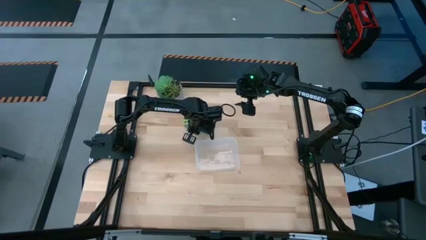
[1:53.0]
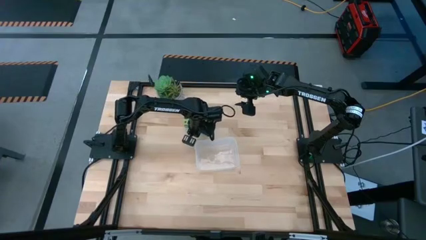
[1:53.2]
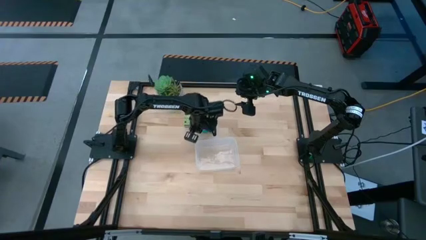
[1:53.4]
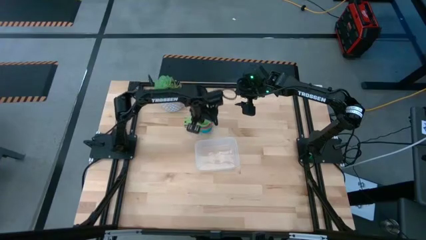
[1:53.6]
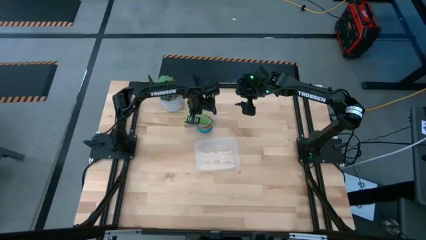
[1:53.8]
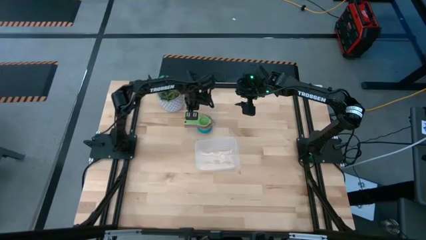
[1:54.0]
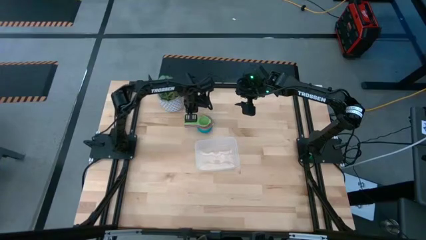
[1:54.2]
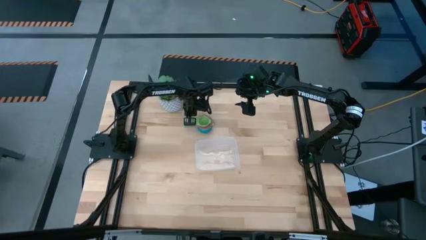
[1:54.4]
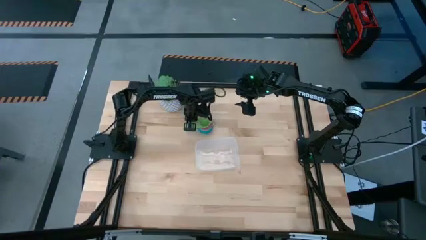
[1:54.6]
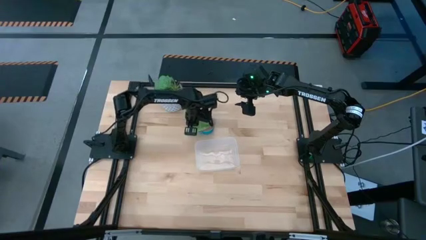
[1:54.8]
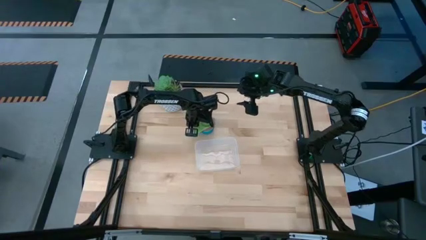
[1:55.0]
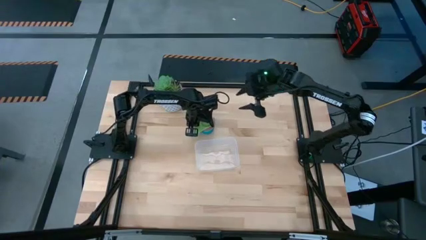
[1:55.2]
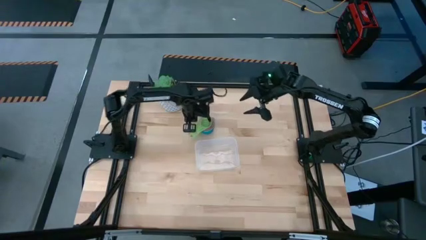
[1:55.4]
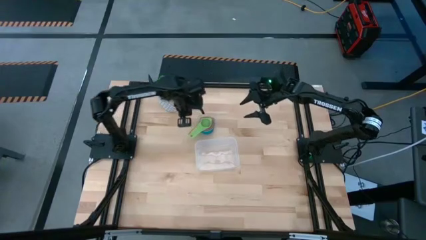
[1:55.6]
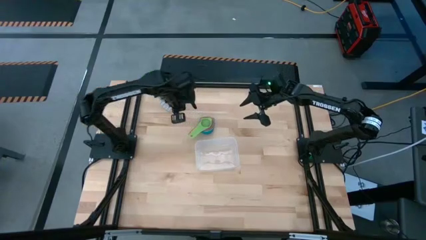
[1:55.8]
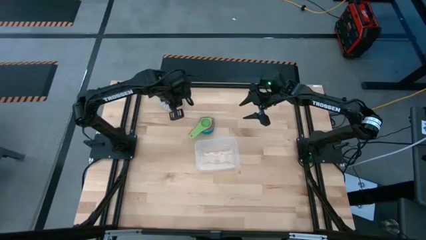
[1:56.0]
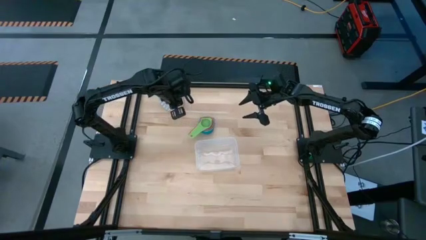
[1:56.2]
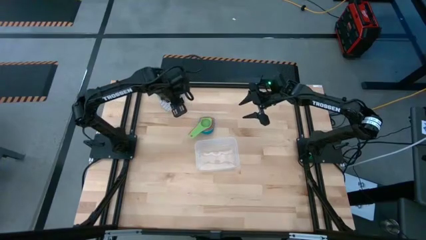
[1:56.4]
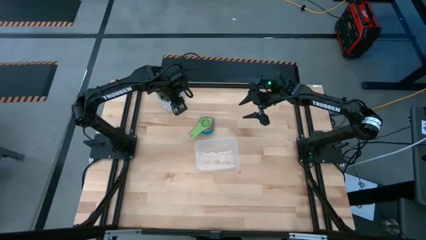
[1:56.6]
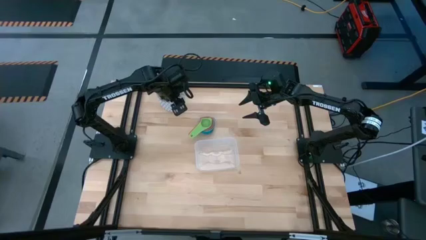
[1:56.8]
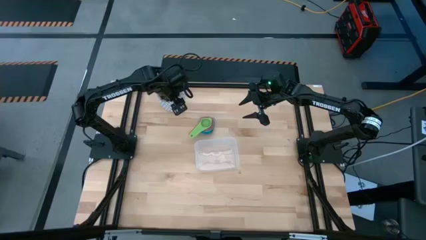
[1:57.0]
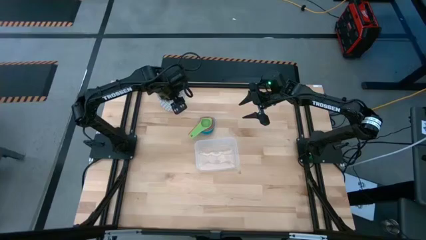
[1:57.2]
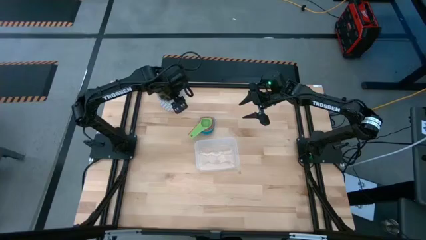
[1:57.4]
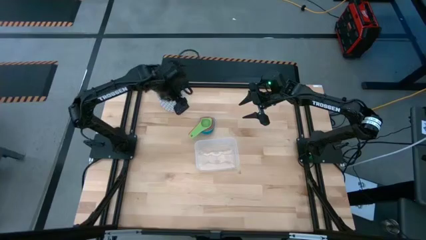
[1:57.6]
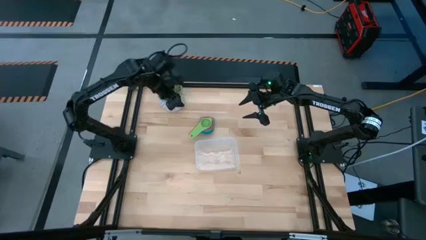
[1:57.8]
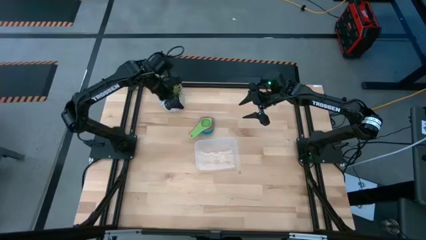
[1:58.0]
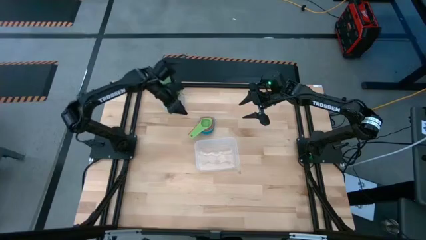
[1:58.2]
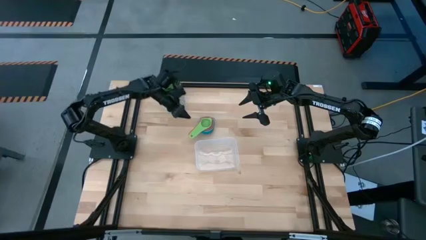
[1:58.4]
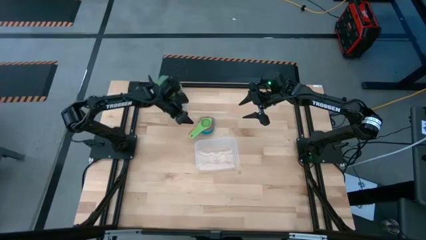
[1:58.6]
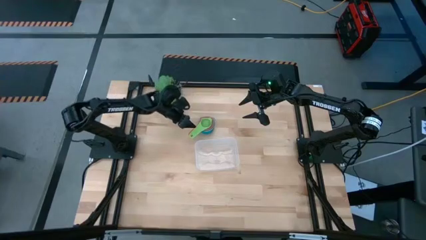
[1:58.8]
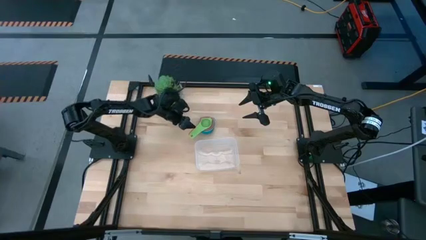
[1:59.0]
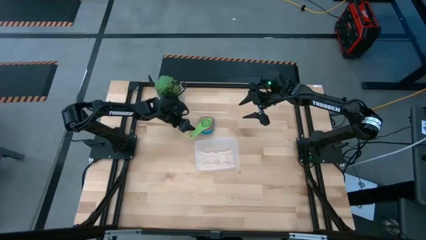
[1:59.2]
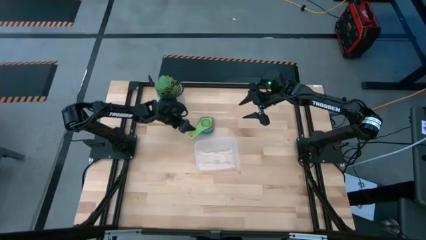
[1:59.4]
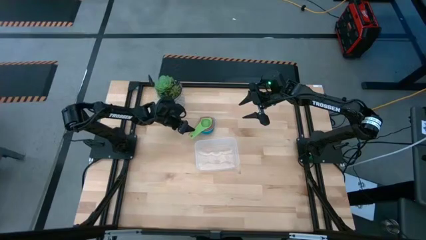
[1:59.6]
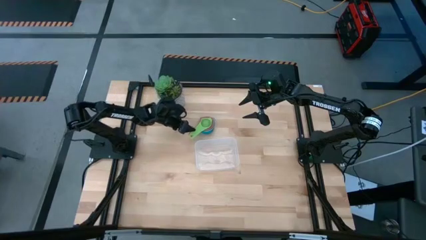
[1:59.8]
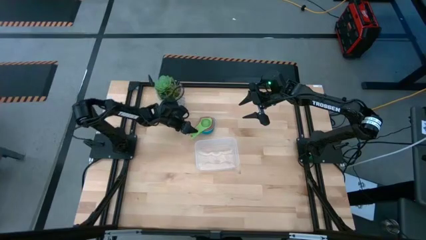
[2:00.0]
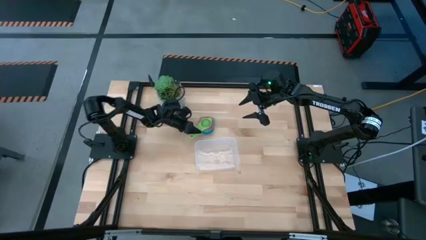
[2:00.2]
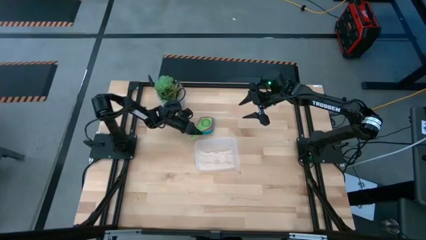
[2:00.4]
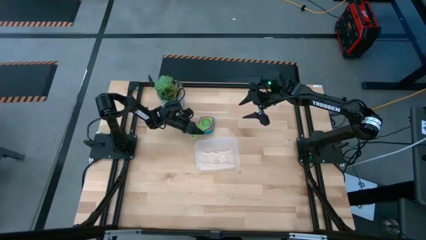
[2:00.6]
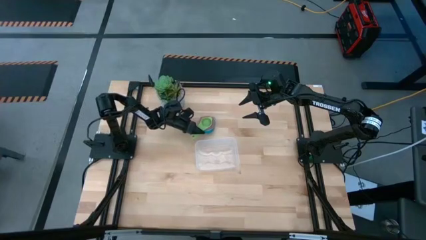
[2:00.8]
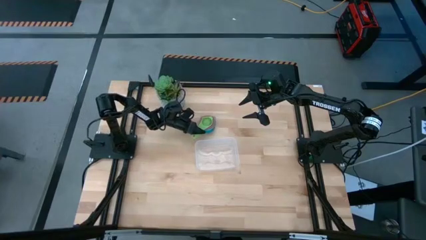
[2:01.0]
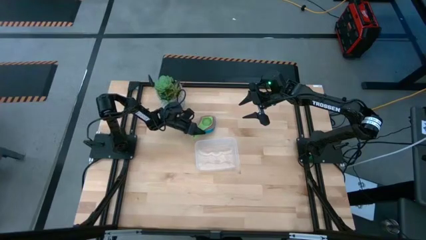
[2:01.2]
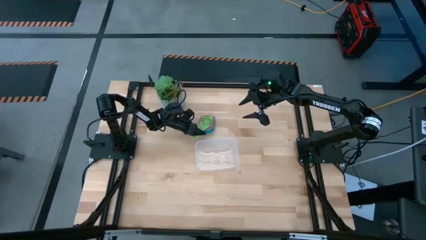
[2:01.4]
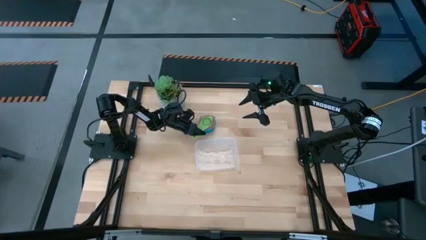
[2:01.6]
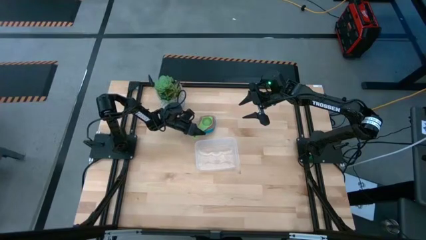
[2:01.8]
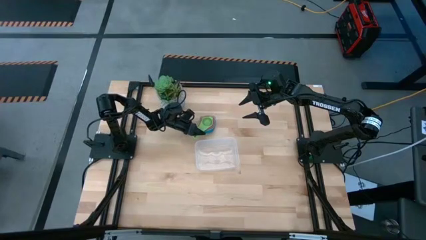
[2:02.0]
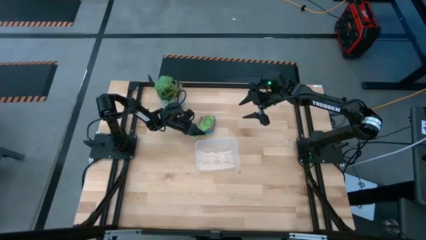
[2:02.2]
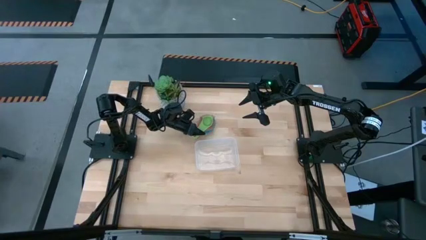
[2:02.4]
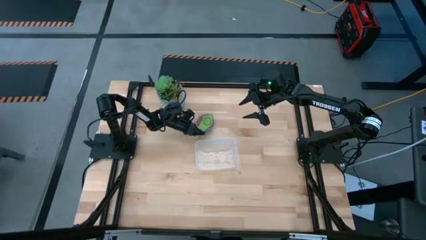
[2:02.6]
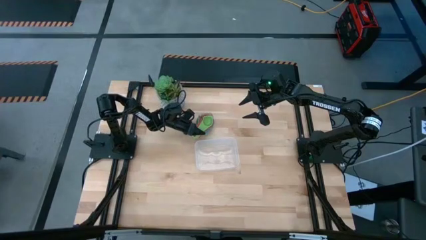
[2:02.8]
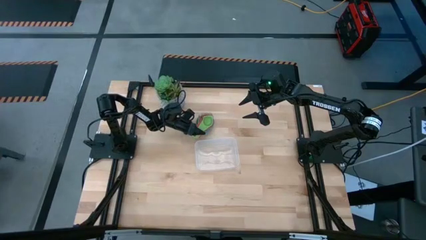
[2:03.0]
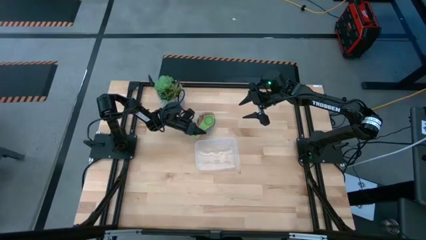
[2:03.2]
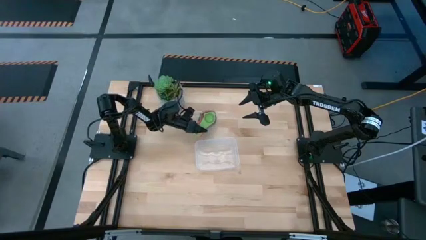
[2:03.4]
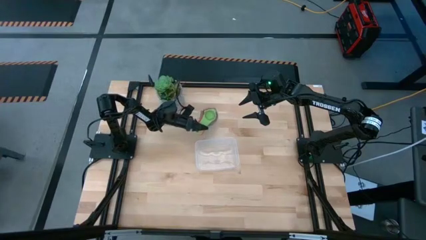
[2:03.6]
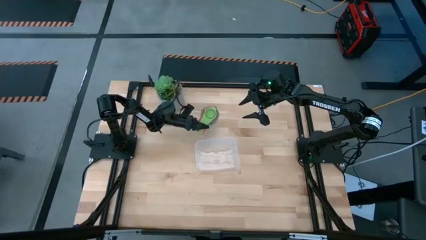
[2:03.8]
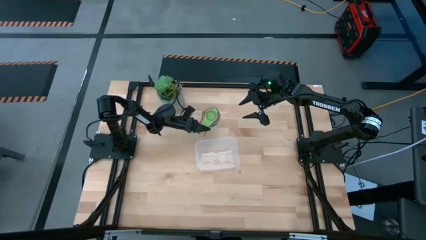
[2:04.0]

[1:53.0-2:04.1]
Task: Nest measuring cups in basket
Put the stacked measuring cups into the transparent bin

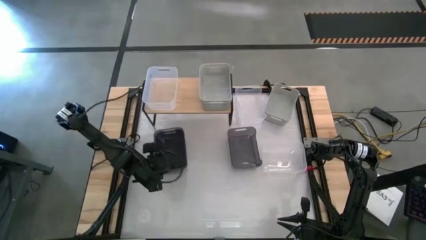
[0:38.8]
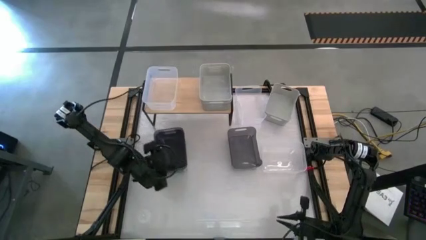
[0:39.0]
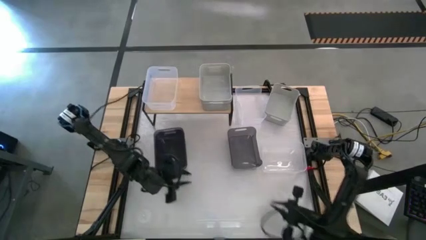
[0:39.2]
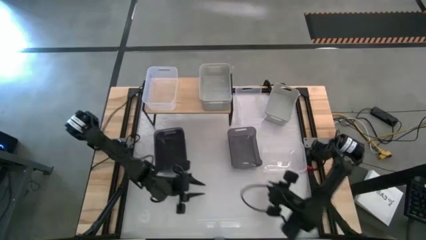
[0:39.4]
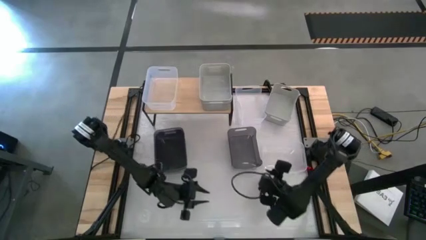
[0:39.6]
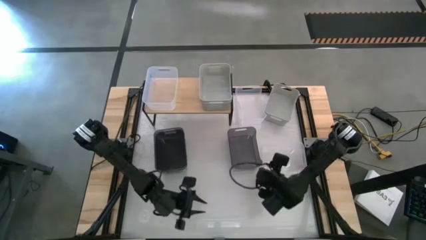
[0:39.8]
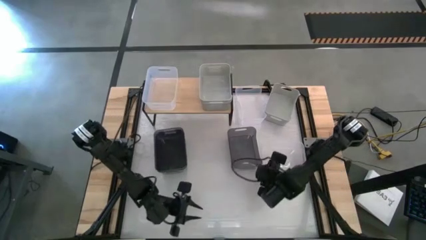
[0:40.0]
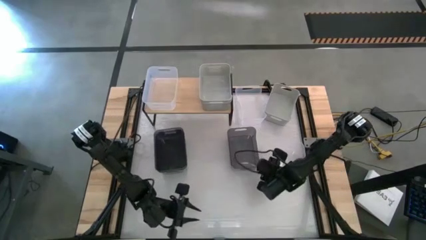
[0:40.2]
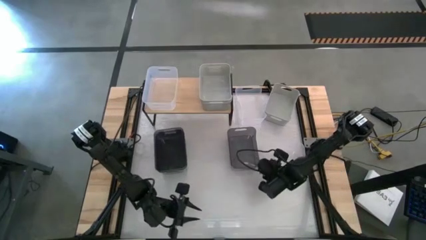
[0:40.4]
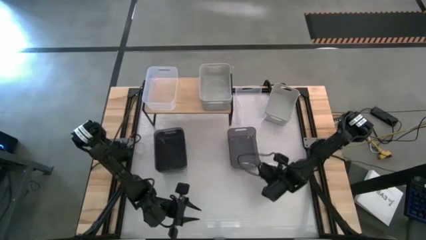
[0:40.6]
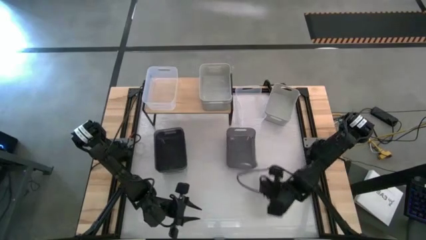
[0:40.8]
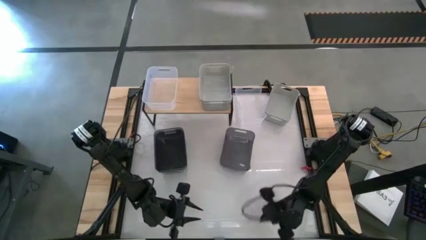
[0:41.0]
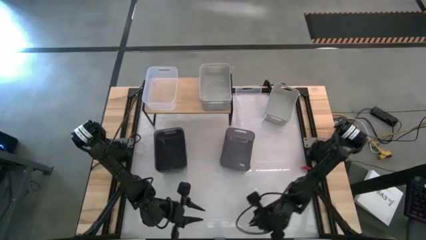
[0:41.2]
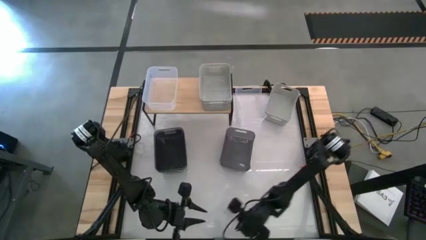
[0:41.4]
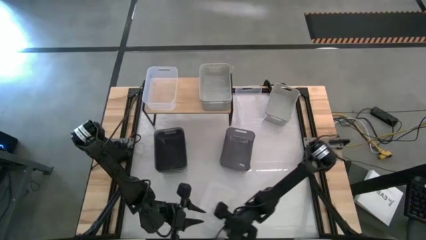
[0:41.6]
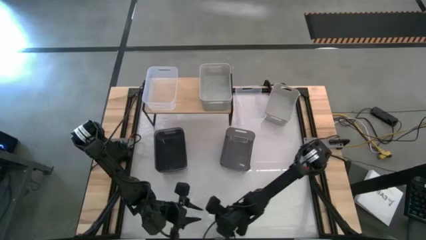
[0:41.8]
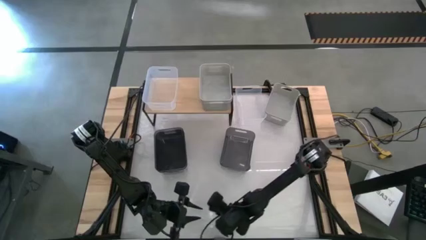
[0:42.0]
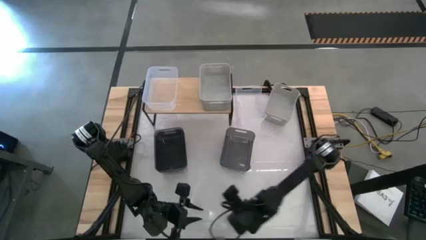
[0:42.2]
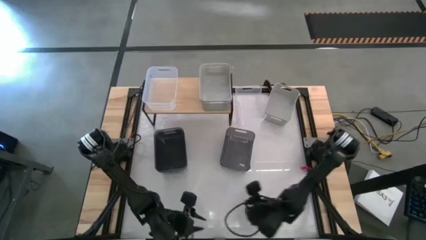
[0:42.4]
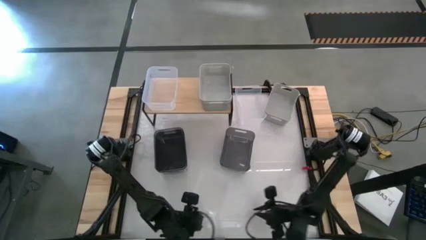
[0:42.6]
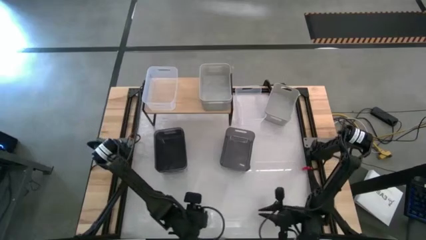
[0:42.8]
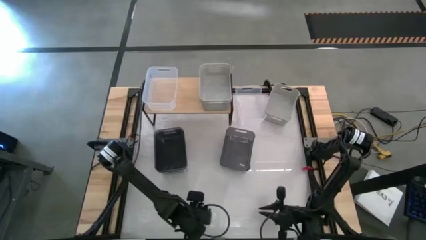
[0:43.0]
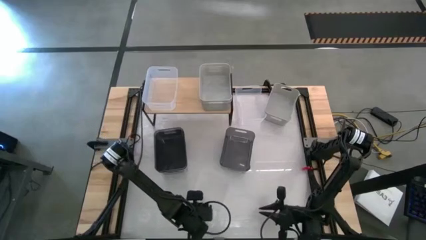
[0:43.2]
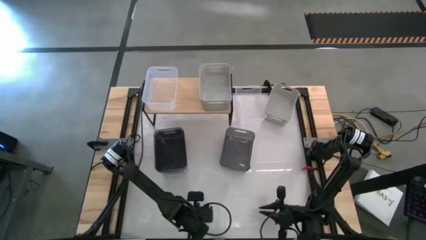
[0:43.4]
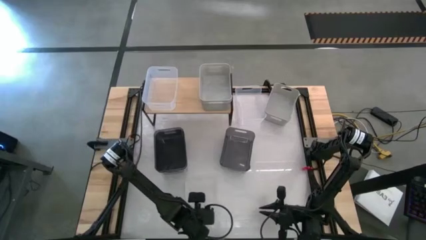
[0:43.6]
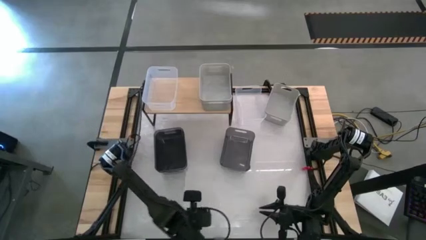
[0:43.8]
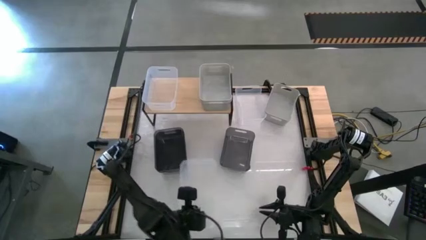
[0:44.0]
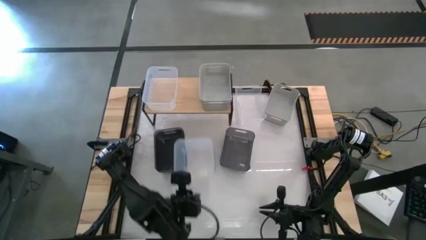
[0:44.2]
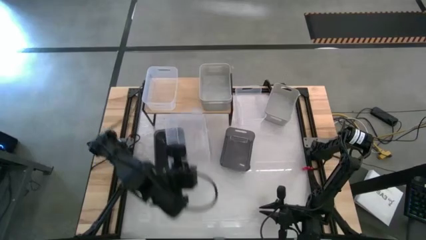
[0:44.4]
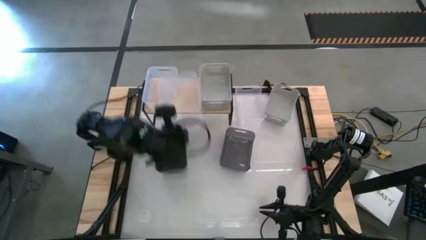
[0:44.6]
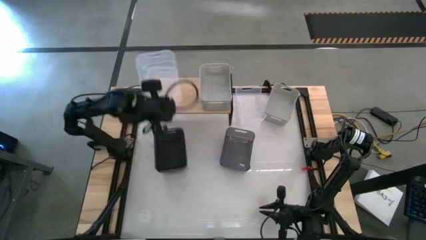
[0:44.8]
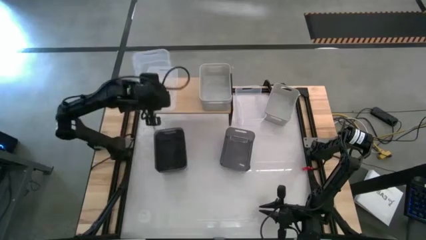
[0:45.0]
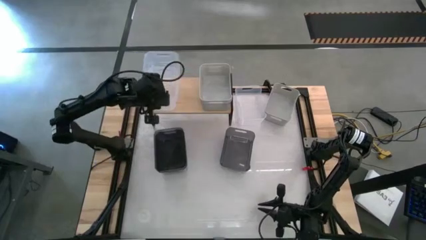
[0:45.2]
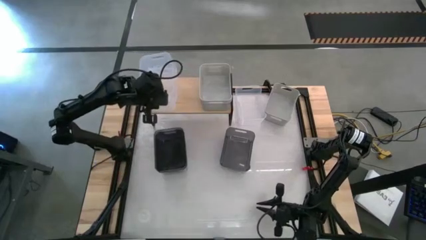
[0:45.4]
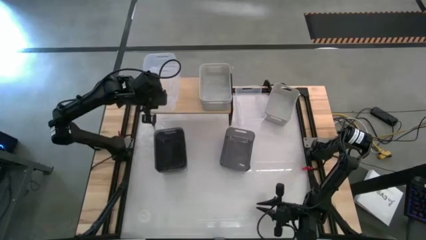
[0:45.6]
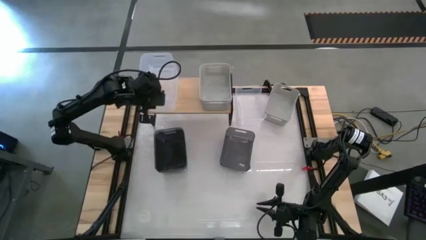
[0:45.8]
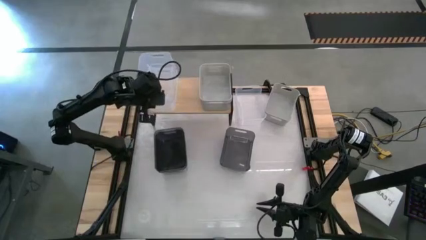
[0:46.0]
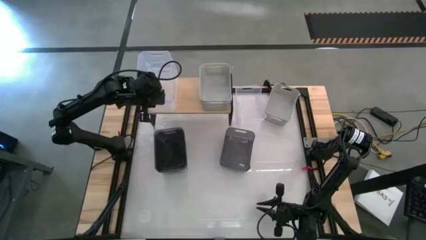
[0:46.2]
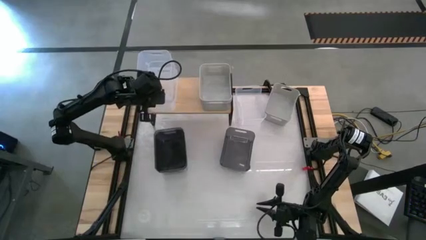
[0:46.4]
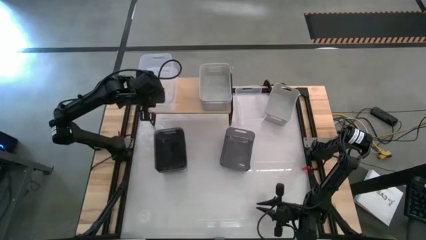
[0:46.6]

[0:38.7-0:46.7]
Task: Stack baskets on shelf by color
Stack the right transparent bin on top of the transparent bin on the shelf
